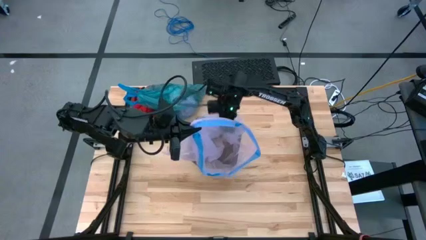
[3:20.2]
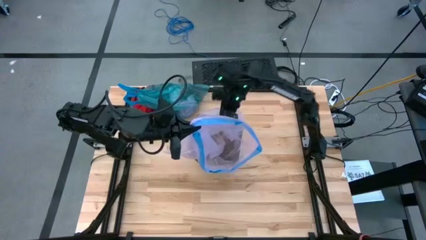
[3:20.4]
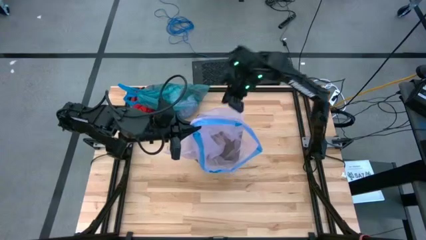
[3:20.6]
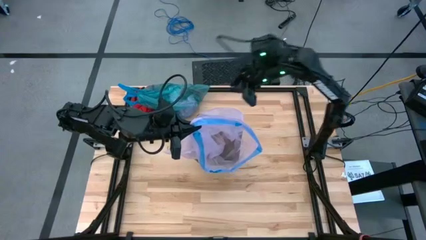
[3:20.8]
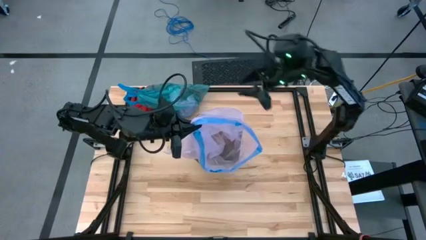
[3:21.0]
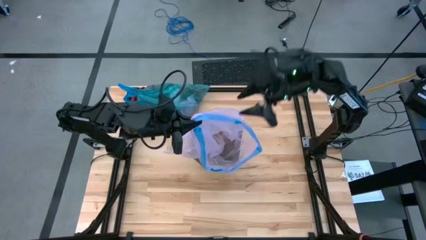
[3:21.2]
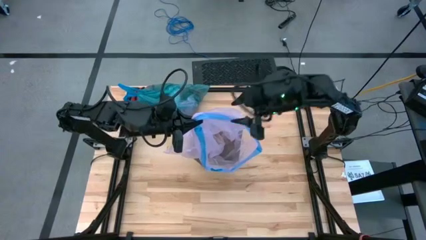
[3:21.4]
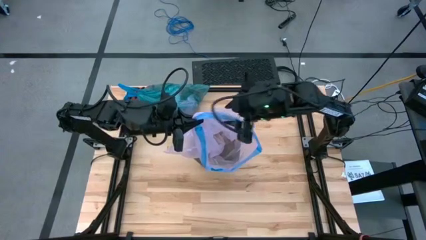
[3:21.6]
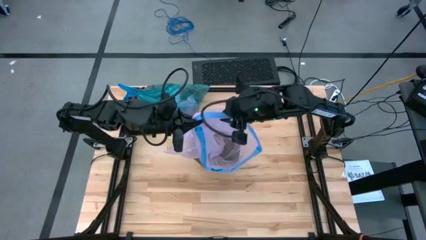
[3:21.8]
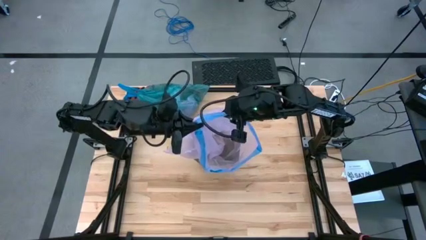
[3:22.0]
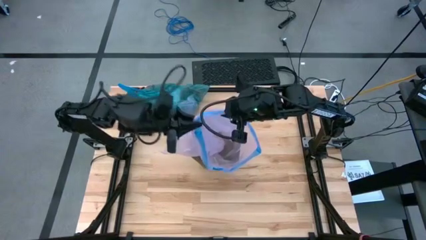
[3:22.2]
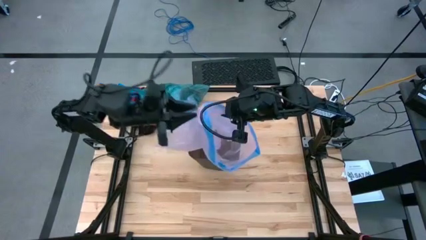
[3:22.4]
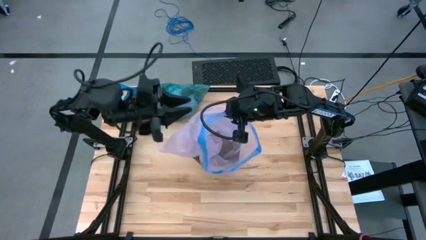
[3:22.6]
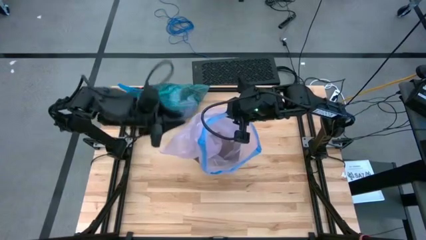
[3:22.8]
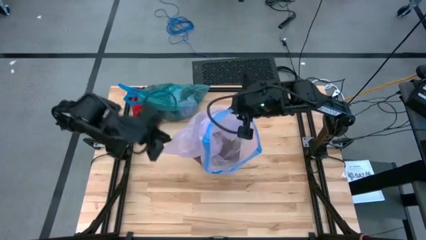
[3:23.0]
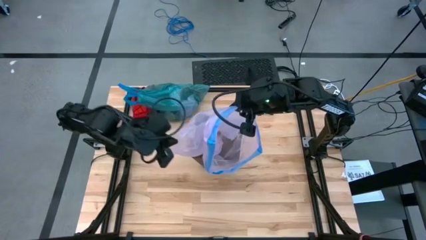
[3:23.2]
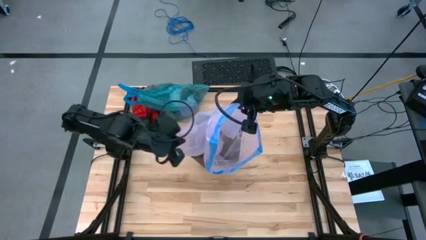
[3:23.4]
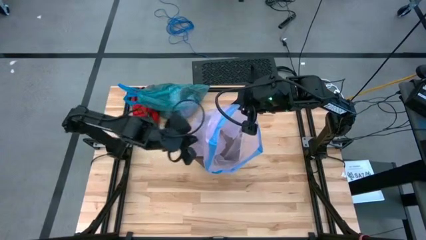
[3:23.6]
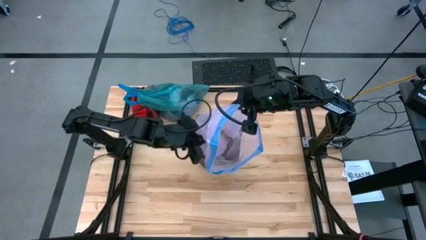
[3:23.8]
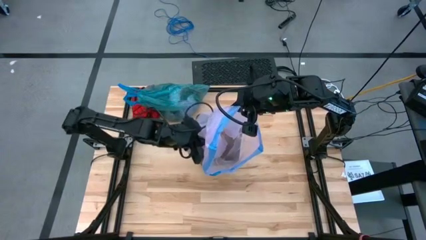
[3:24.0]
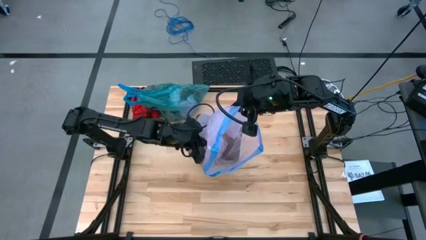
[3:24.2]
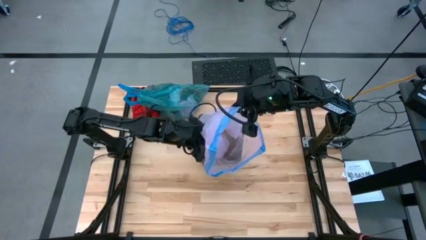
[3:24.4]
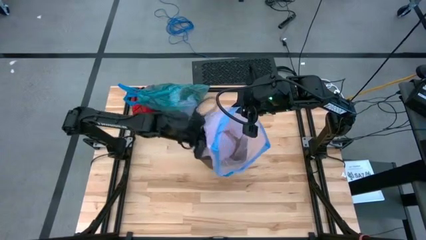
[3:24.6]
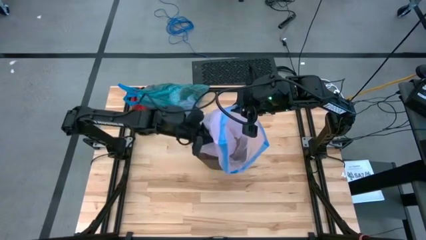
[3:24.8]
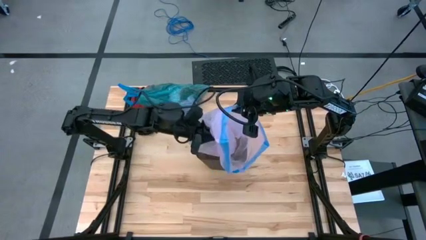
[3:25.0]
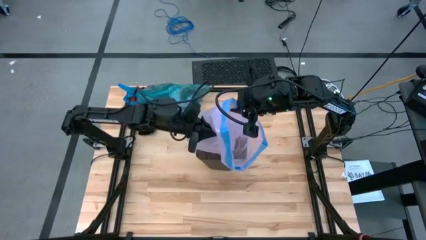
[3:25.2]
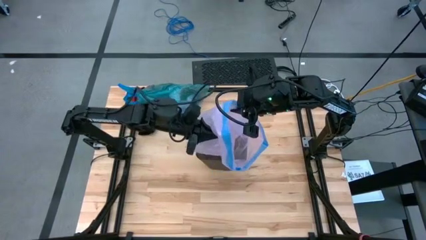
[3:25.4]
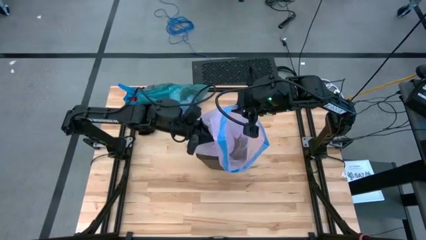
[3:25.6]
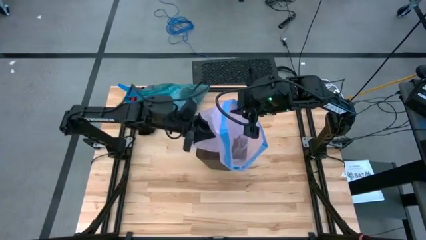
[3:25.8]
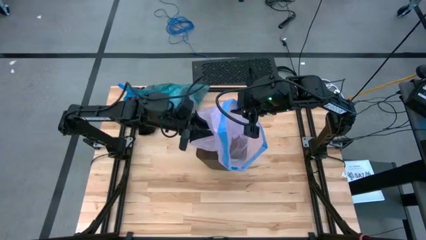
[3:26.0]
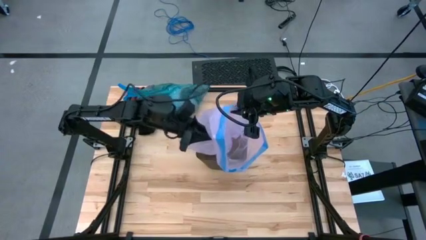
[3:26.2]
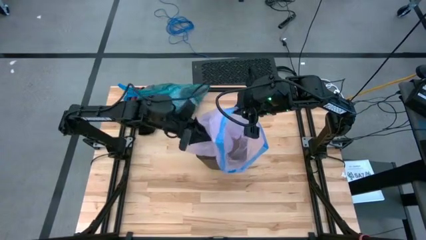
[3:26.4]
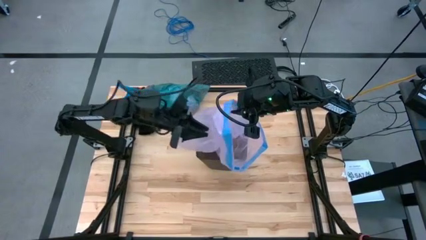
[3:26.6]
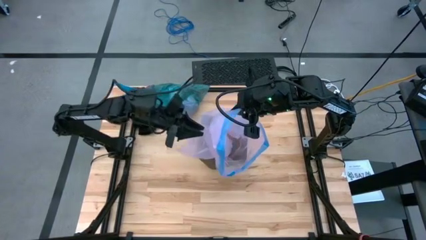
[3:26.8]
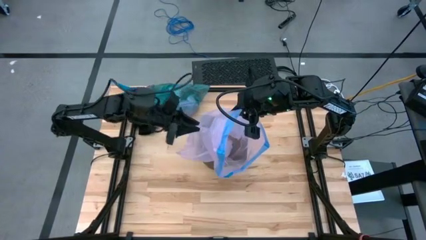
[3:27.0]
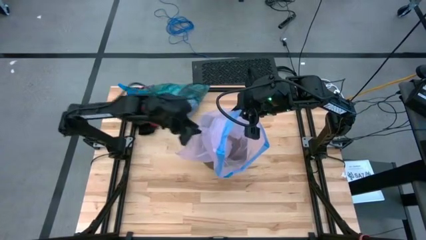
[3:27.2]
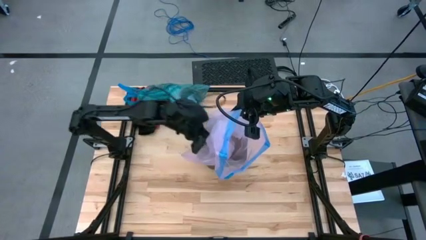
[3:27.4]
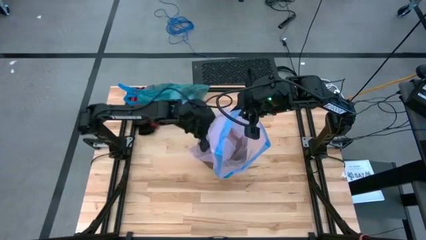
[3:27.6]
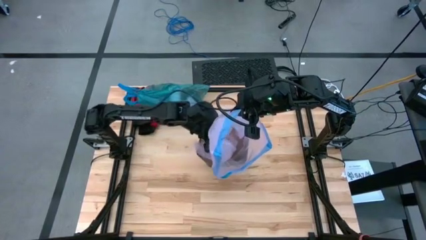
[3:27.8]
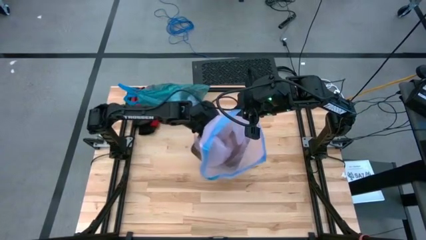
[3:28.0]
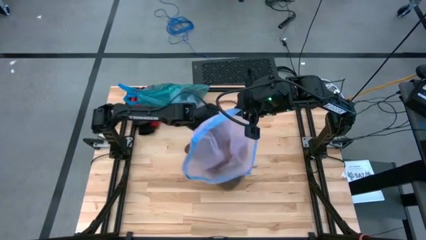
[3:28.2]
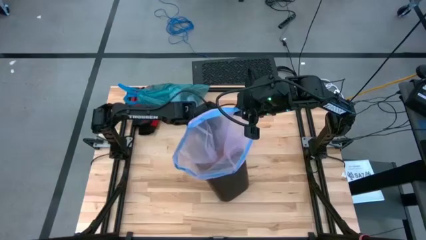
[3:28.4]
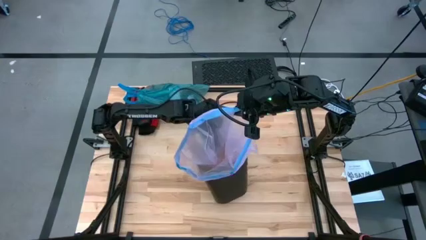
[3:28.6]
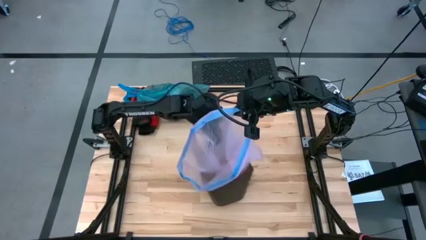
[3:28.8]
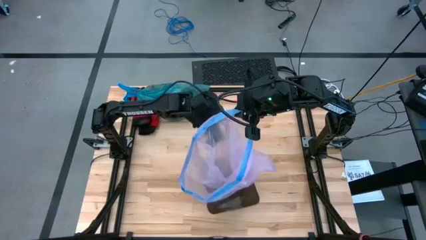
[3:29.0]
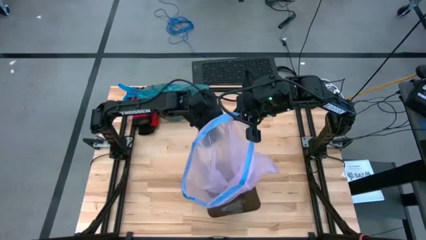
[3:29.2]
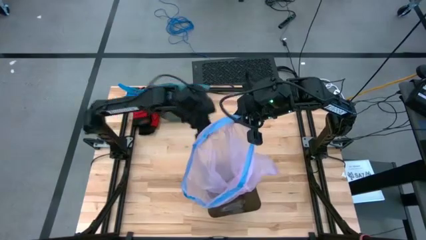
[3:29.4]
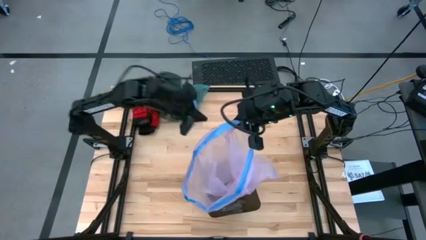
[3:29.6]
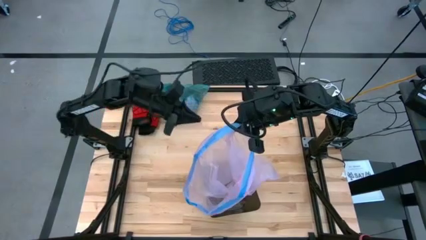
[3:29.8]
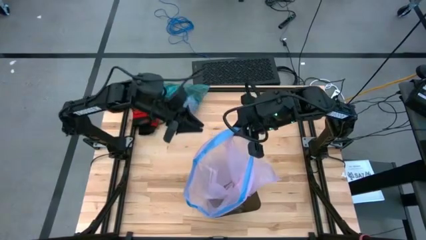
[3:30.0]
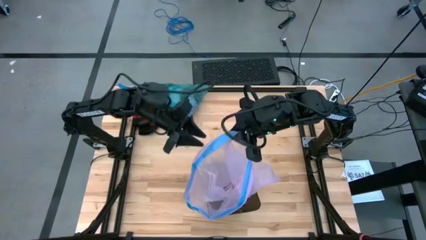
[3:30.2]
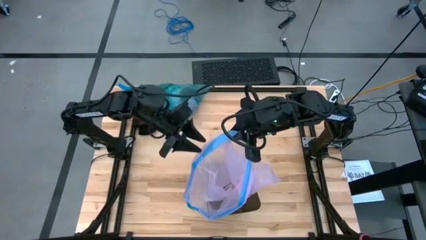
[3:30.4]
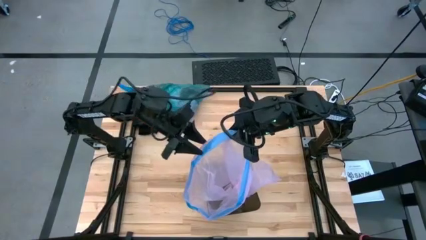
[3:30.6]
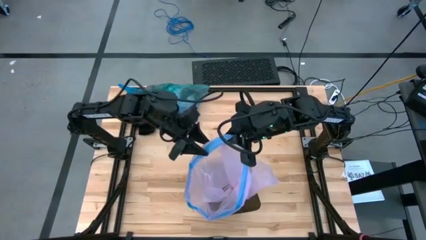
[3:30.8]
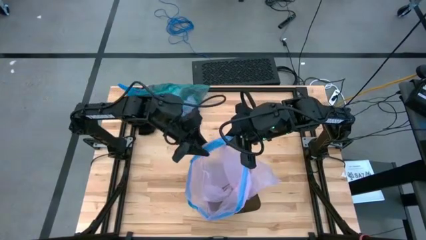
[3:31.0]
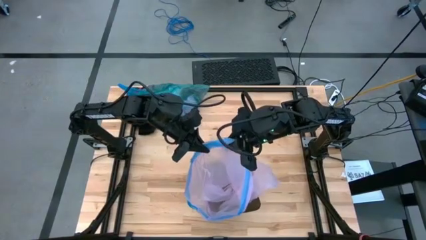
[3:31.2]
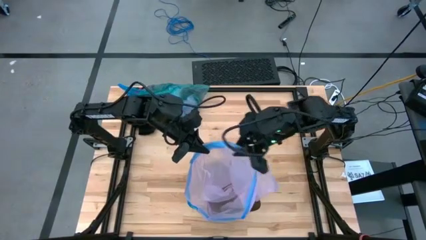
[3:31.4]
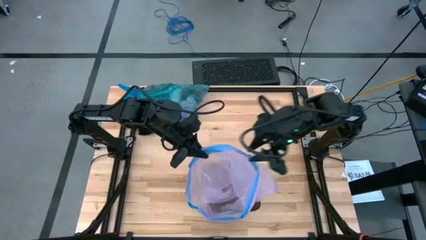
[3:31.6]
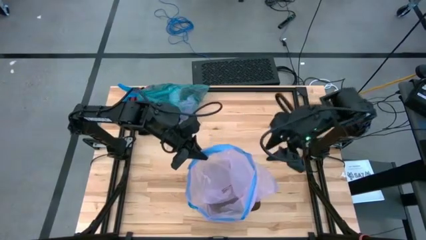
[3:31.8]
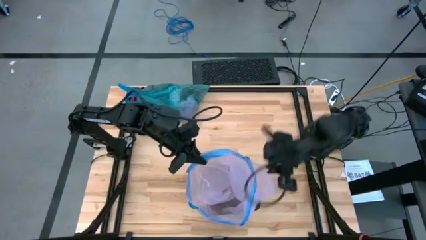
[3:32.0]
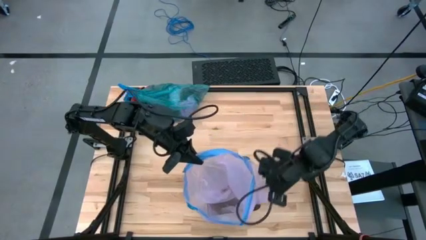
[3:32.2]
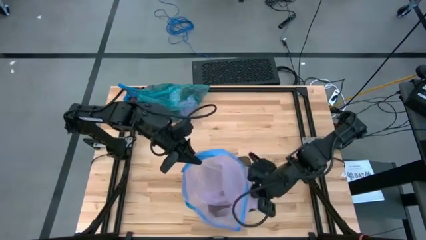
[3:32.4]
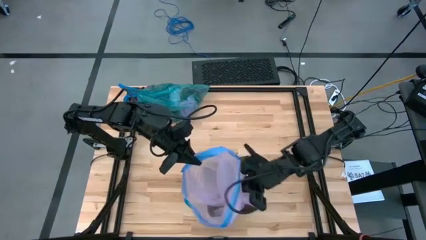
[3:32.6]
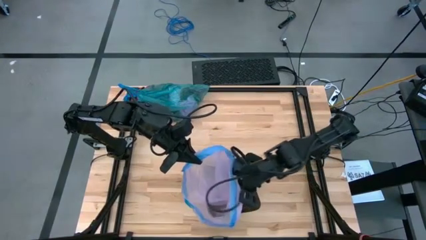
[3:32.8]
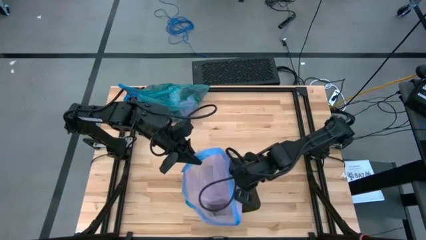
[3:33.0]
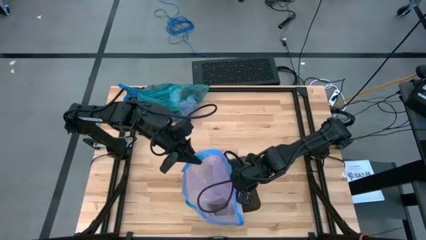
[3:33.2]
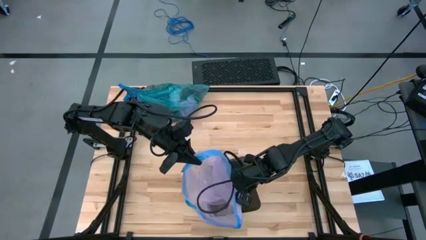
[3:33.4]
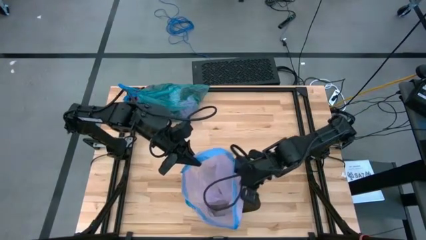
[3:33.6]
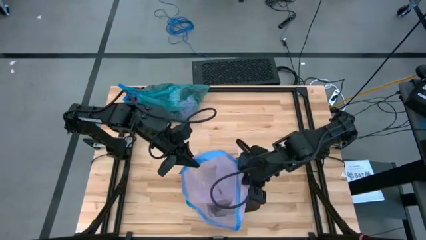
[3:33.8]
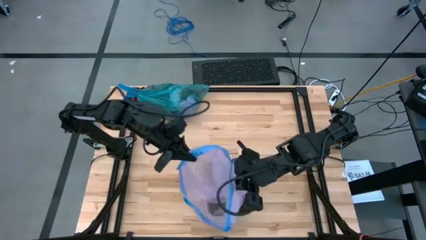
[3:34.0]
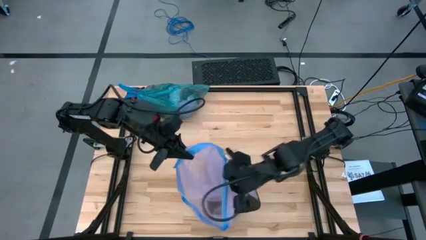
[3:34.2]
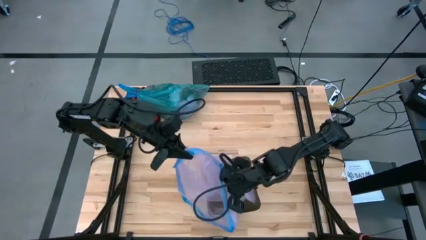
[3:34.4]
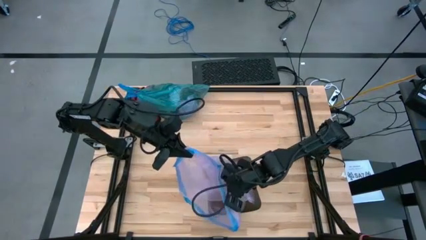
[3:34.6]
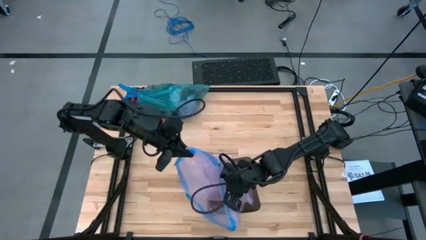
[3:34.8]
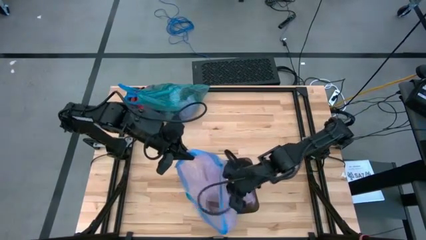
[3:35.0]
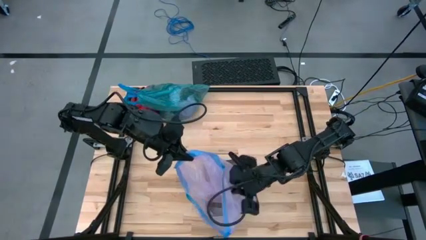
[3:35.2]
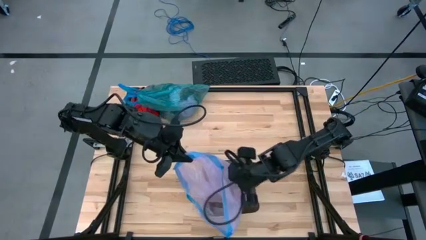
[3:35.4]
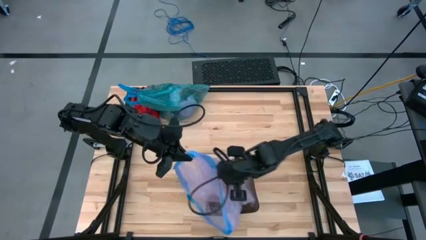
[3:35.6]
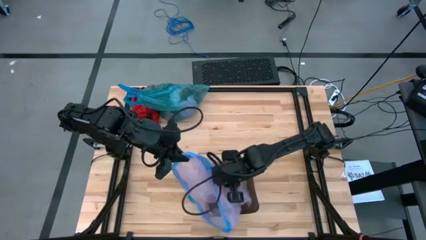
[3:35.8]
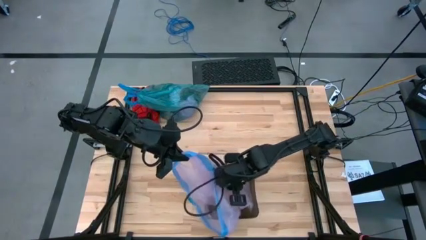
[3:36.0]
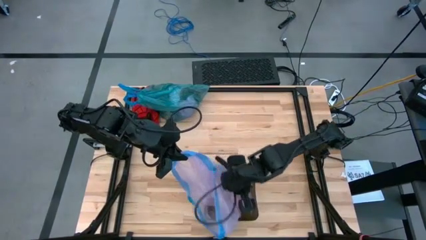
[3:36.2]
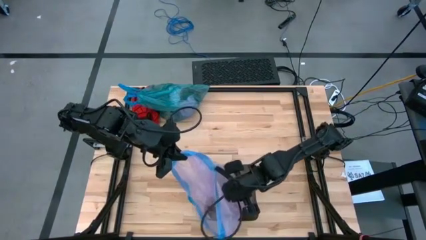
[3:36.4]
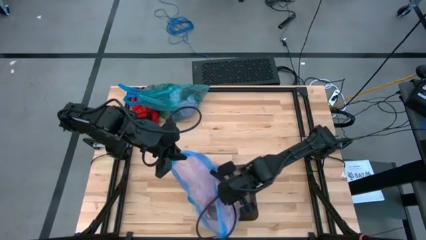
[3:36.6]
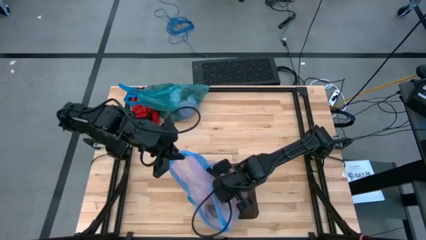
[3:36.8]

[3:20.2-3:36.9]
Task: place trash/remove bag and relplace
Insert the new pink trash bag into the black trash bin
